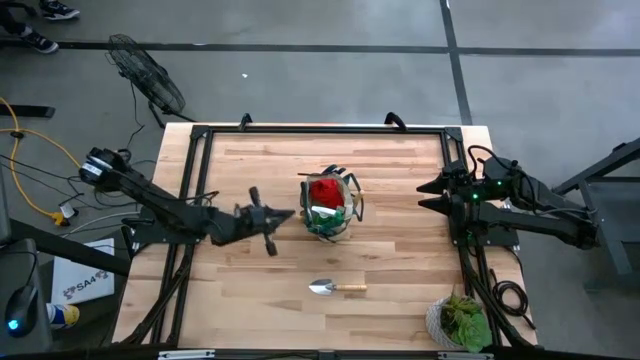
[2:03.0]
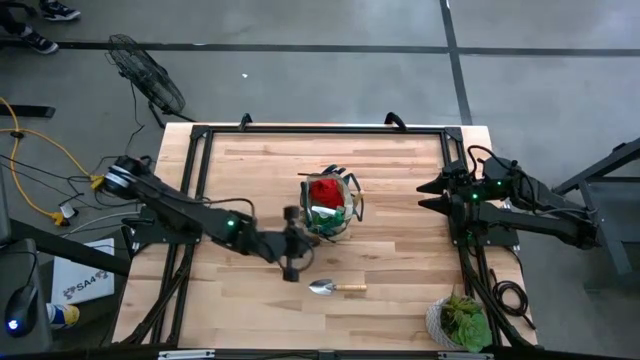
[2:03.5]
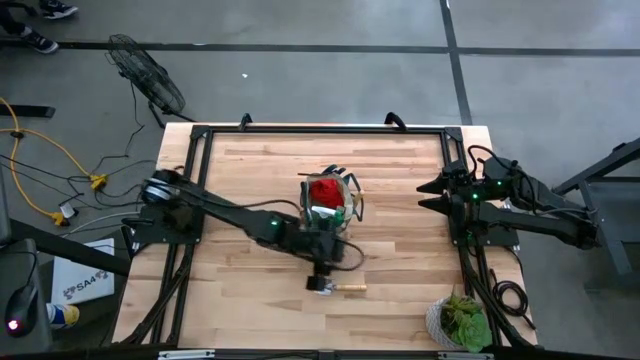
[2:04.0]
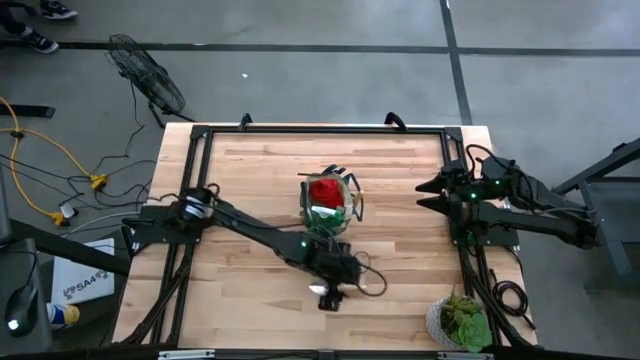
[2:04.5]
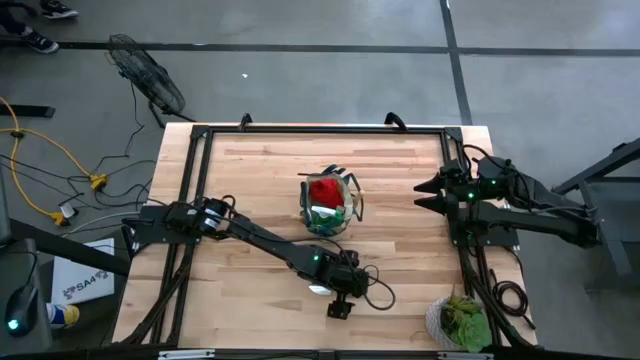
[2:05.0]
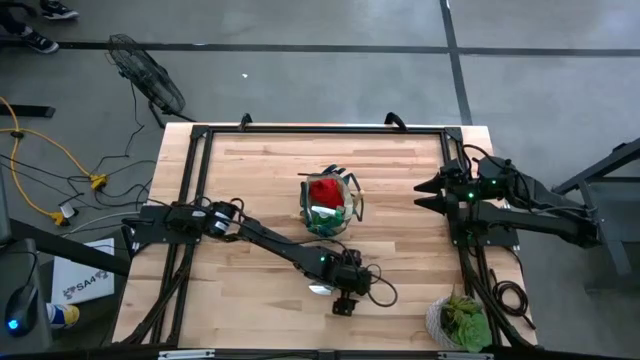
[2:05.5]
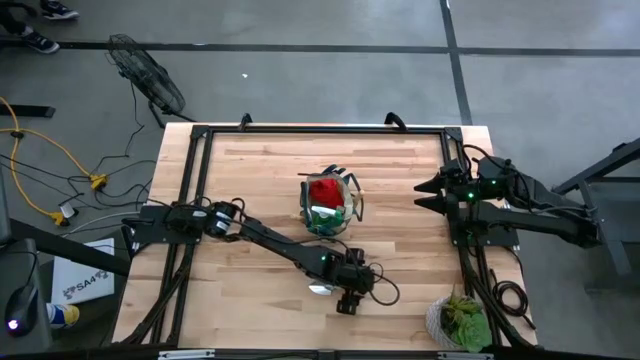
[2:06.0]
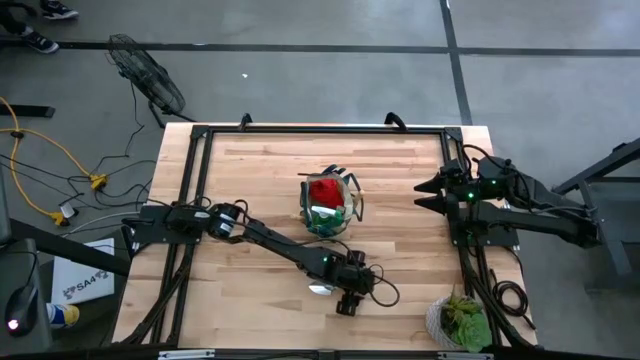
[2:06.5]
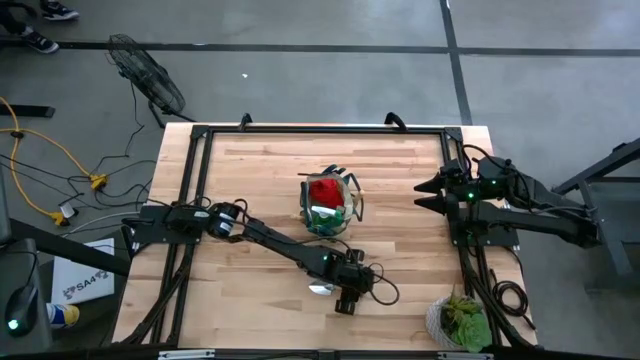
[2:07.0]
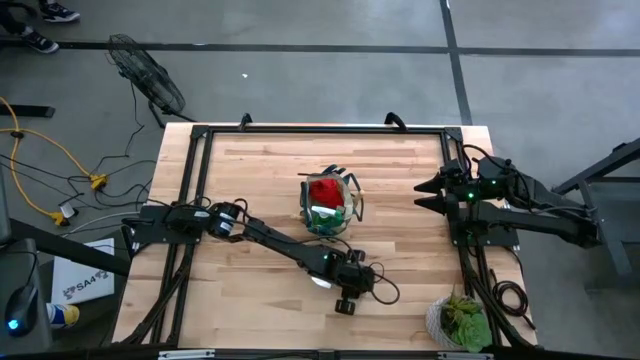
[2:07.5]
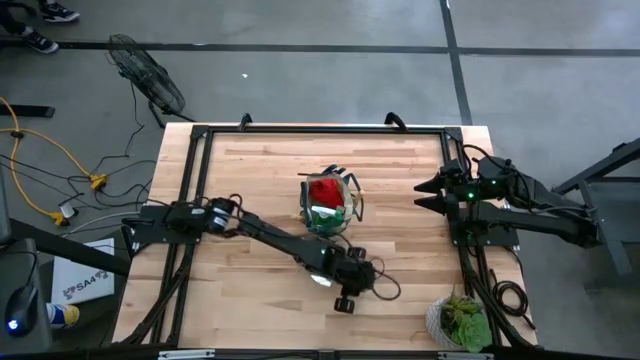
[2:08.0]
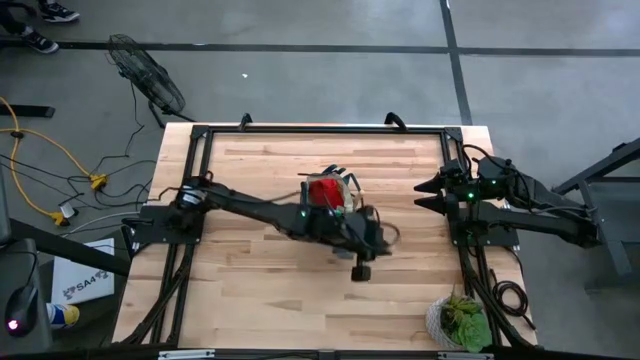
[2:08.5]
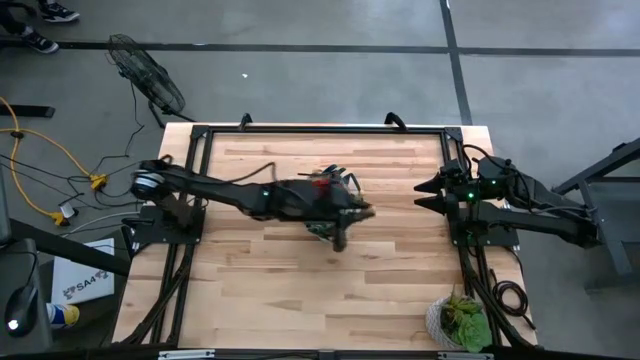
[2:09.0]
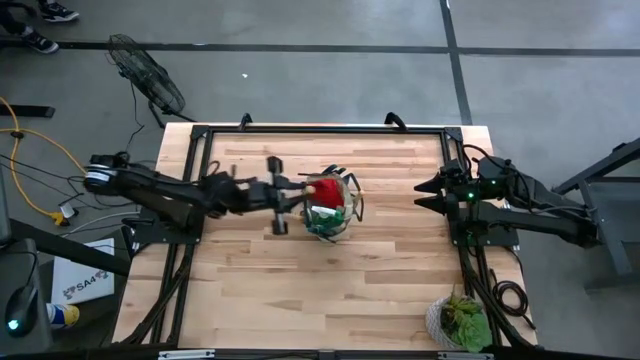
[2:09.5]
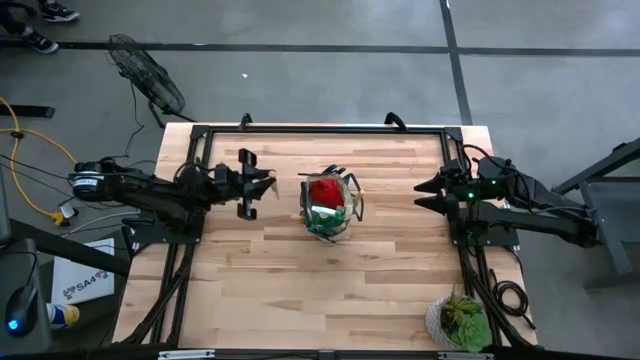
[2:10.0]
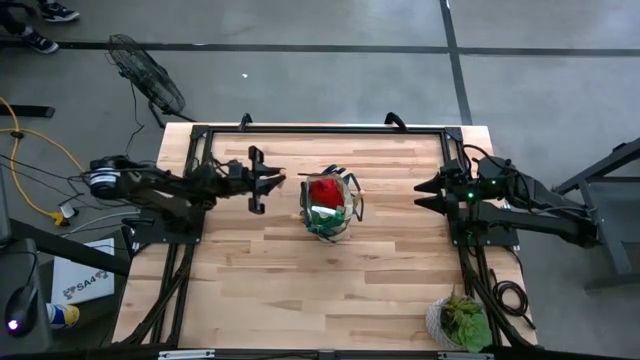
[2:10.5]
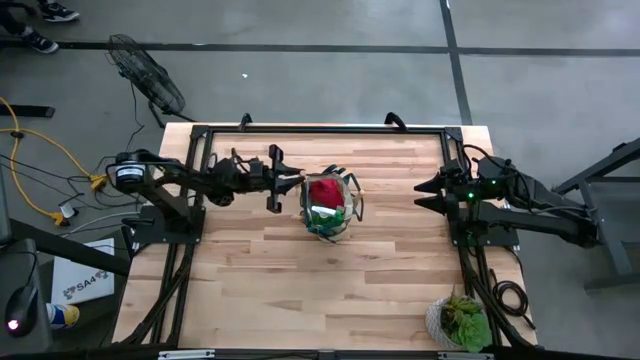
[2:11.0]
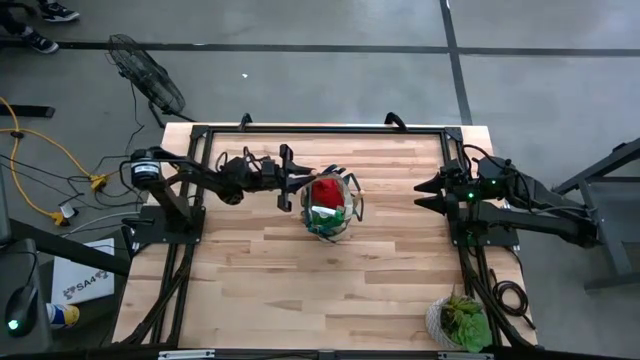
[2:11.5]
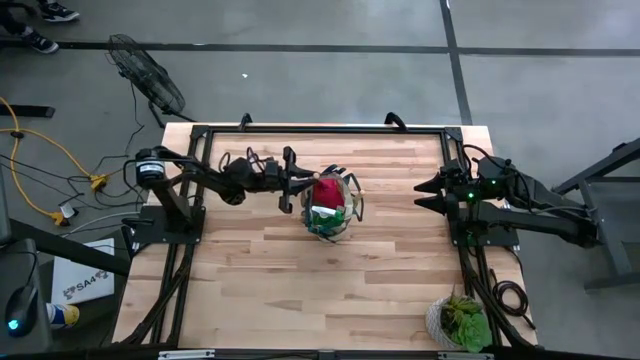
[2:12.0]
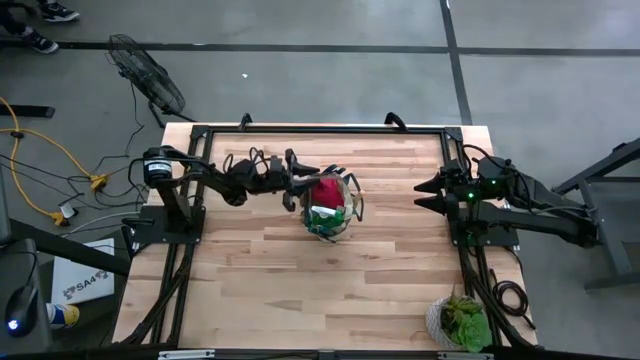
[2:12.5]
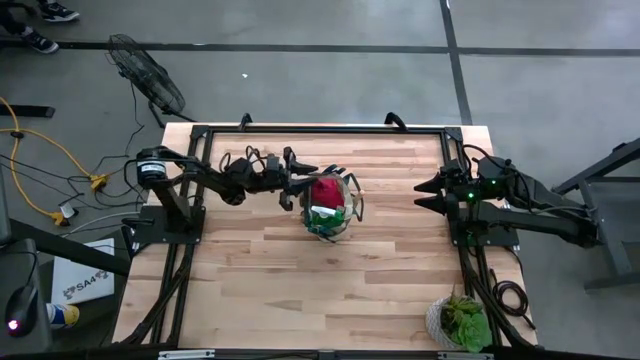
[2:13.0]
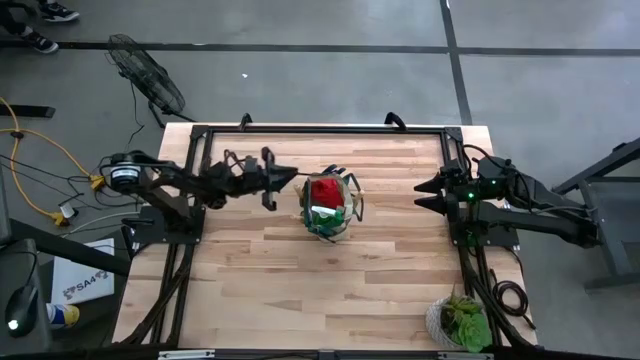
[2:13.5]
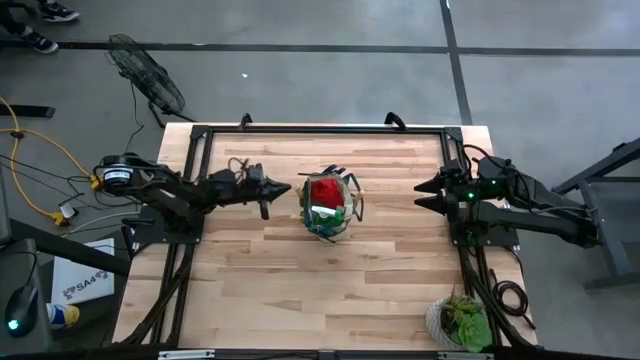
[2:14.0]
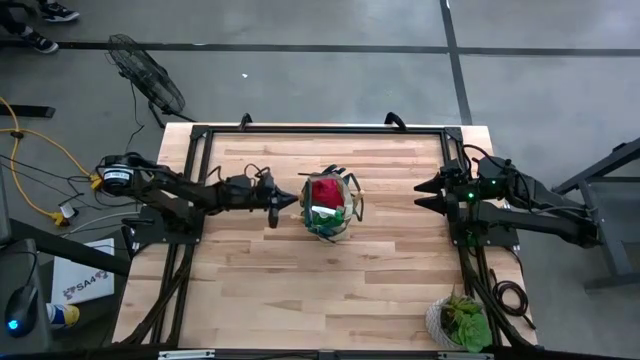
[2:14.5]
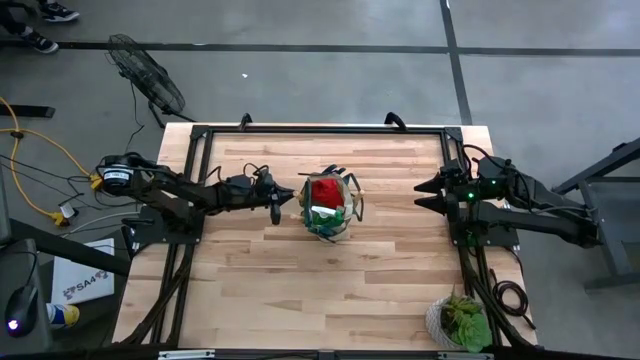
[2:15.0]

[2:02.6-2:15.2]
Task: Pick & Place Garden tools in Gardening bag
Put the trowel into the gardening bag

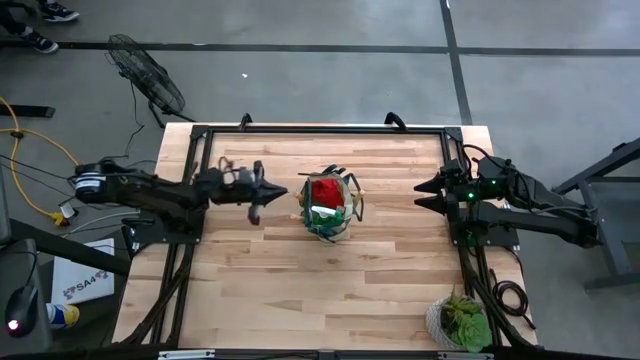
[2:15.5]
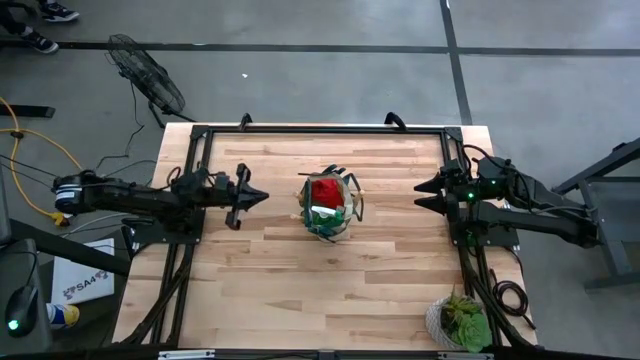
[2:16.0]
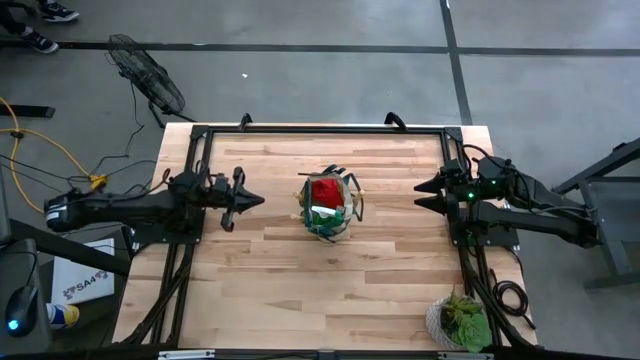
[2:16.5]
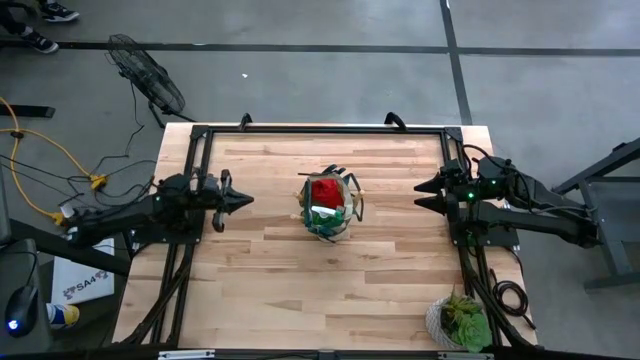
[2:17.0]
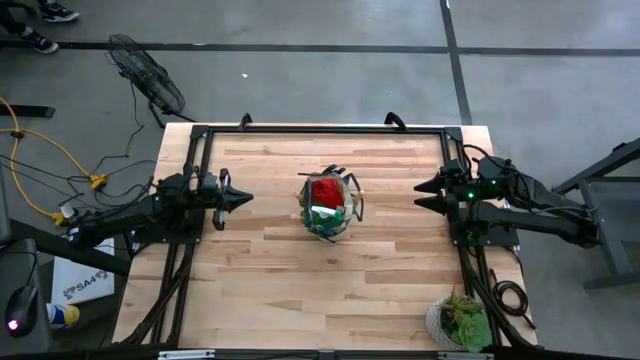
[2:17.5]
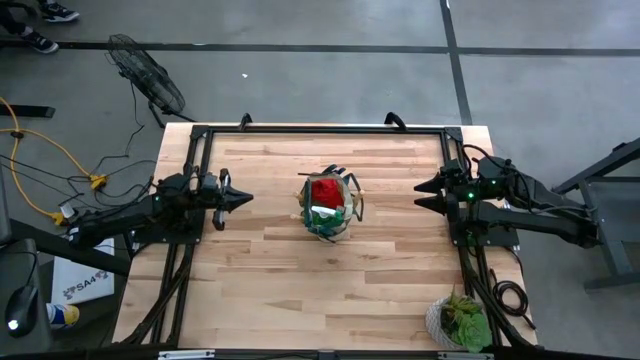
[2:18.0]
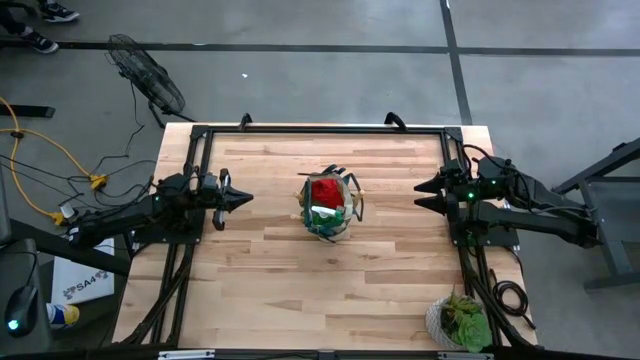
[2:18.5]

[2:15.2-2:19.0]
Return to Home Position
